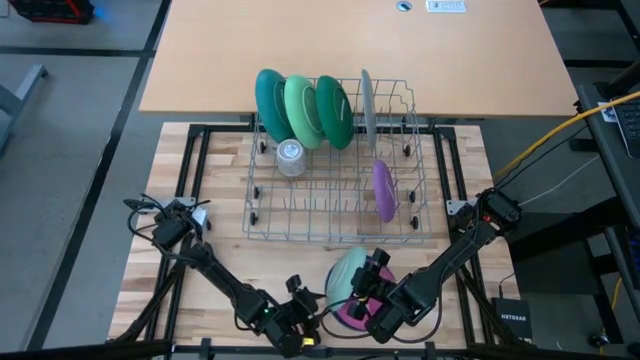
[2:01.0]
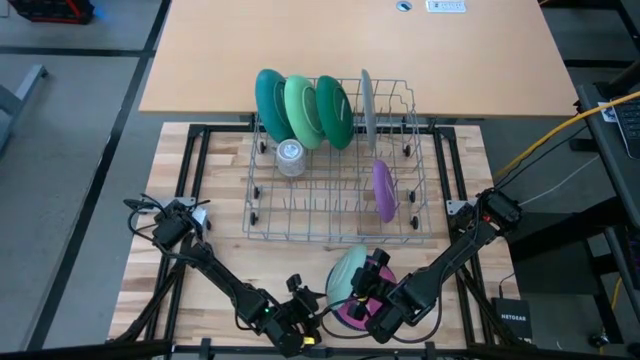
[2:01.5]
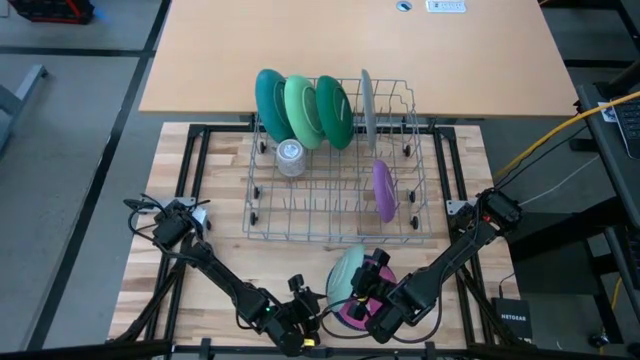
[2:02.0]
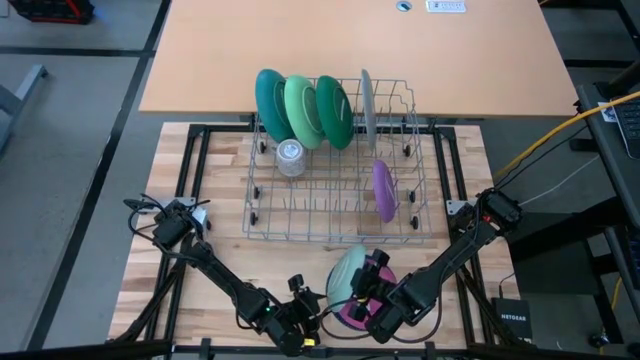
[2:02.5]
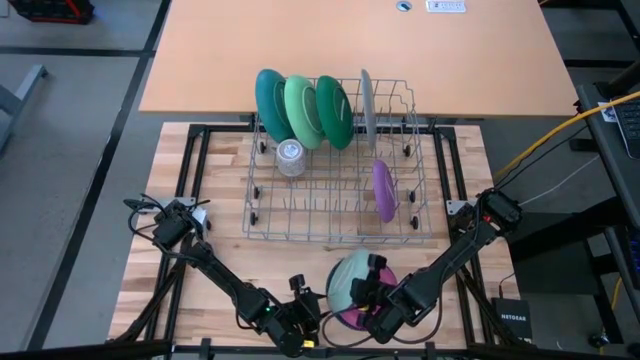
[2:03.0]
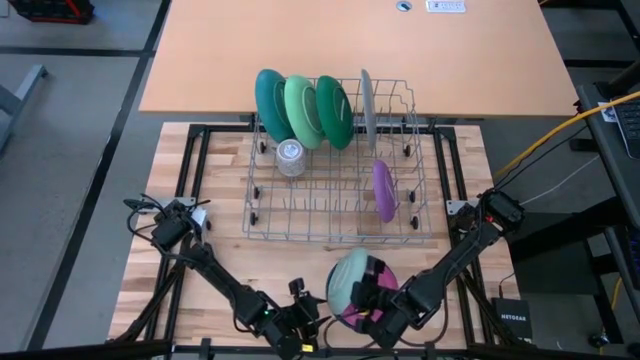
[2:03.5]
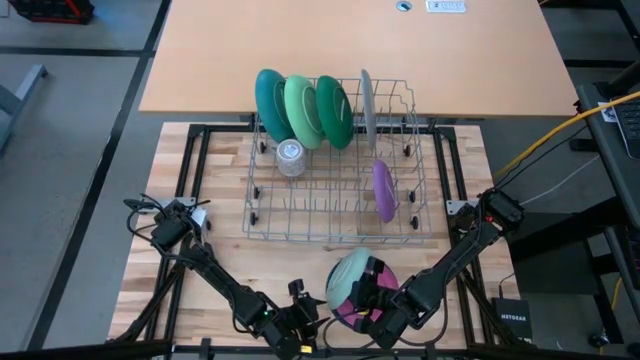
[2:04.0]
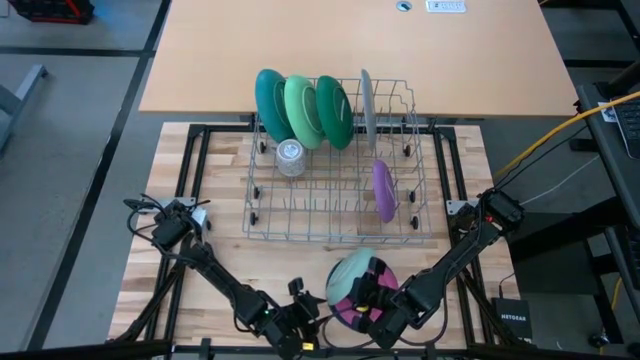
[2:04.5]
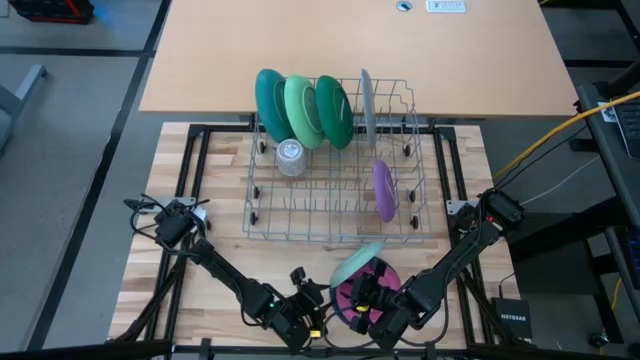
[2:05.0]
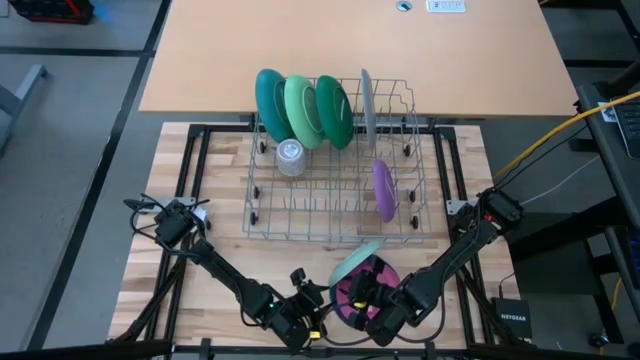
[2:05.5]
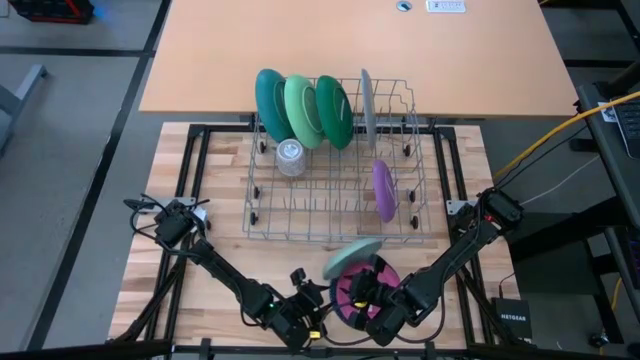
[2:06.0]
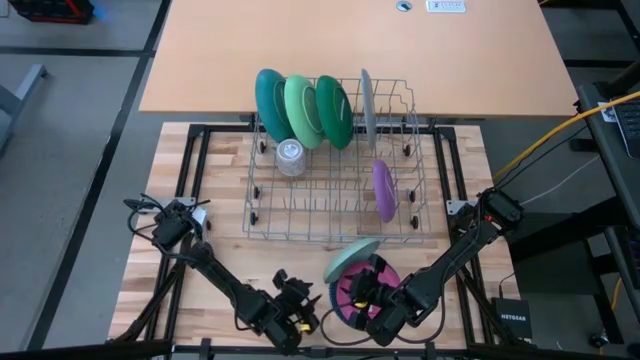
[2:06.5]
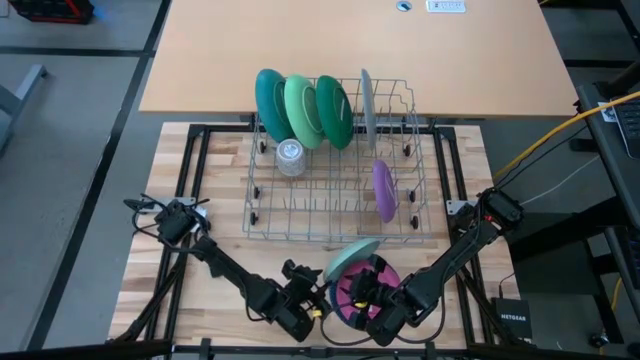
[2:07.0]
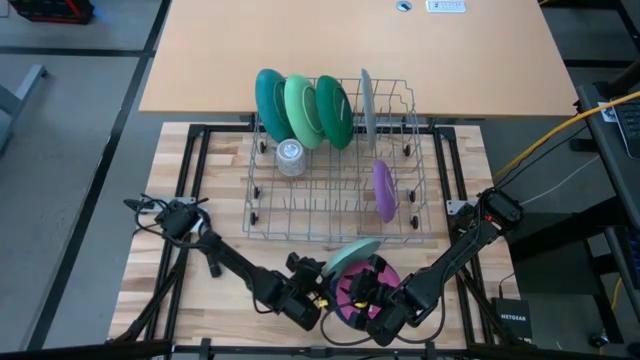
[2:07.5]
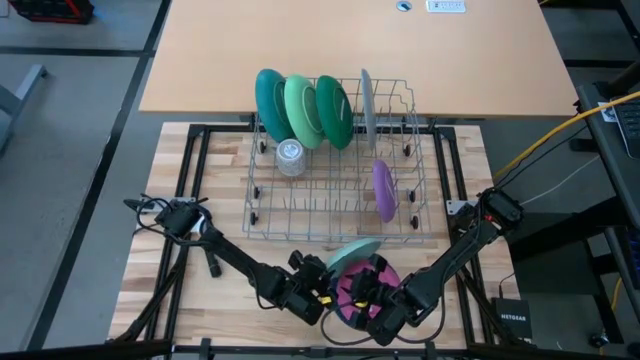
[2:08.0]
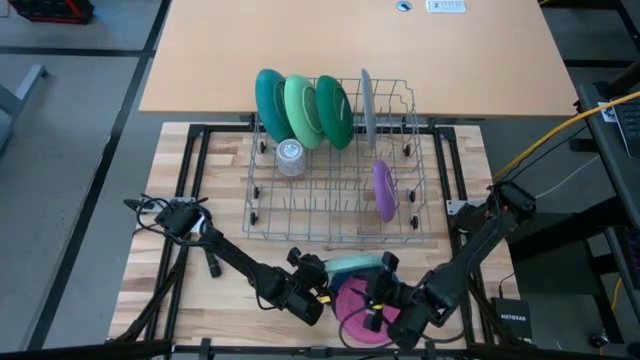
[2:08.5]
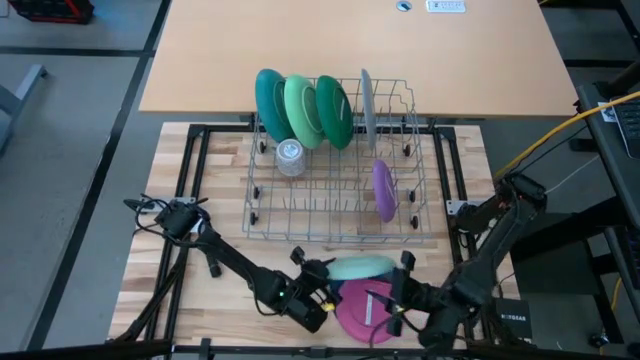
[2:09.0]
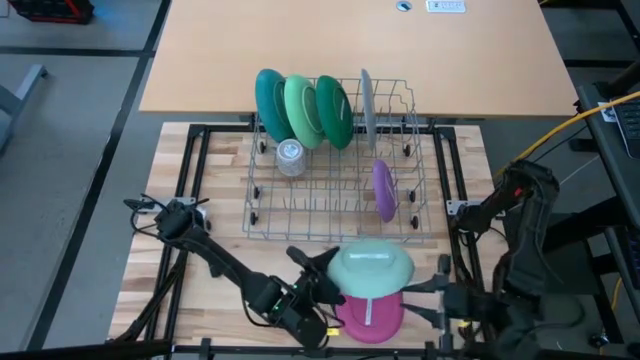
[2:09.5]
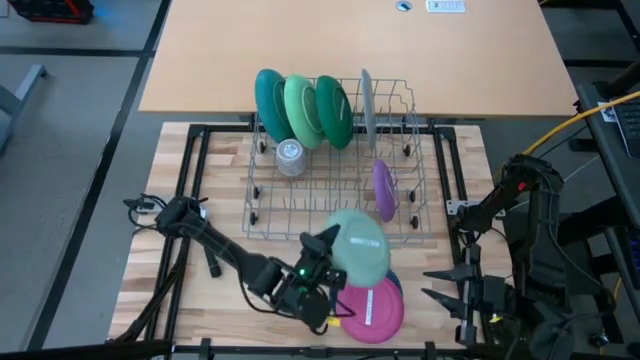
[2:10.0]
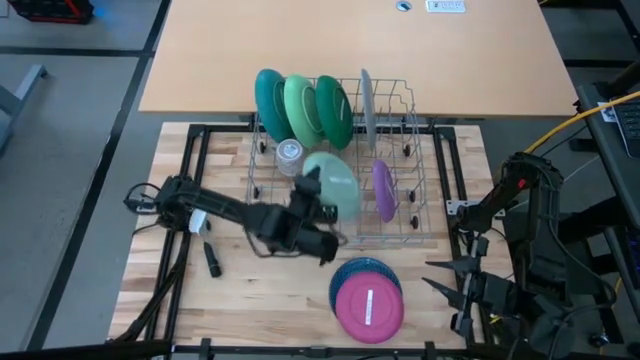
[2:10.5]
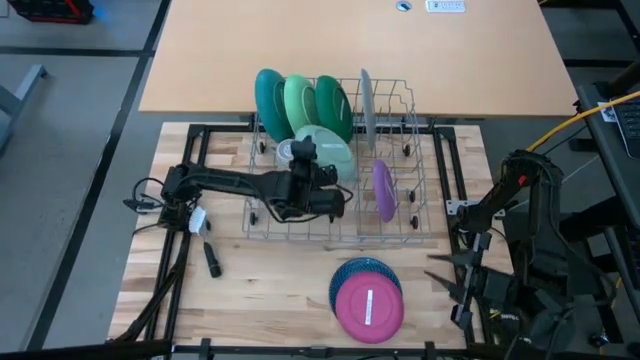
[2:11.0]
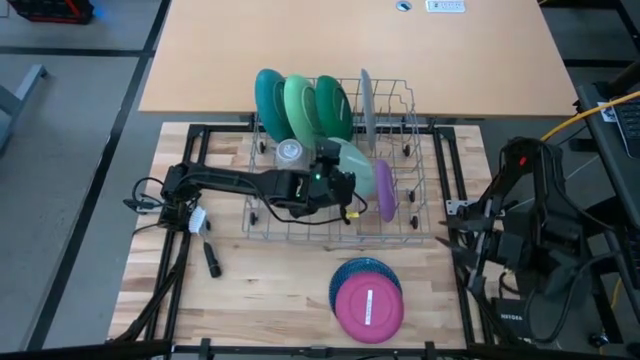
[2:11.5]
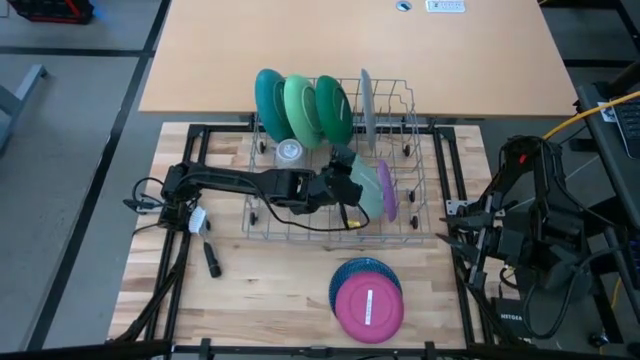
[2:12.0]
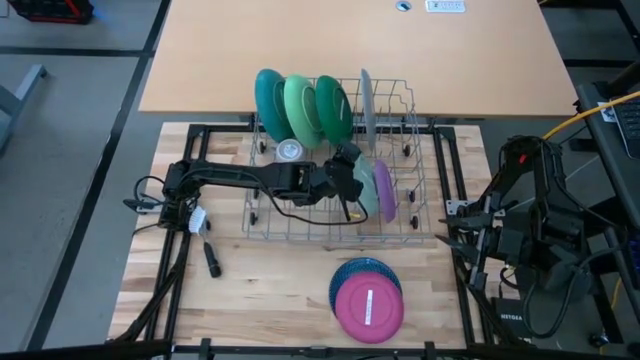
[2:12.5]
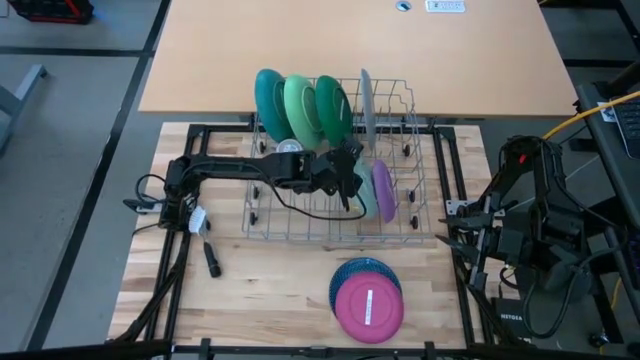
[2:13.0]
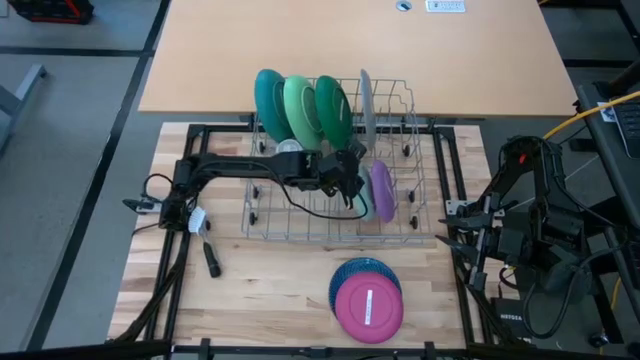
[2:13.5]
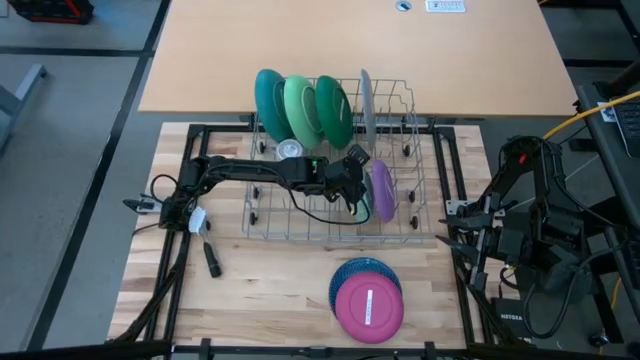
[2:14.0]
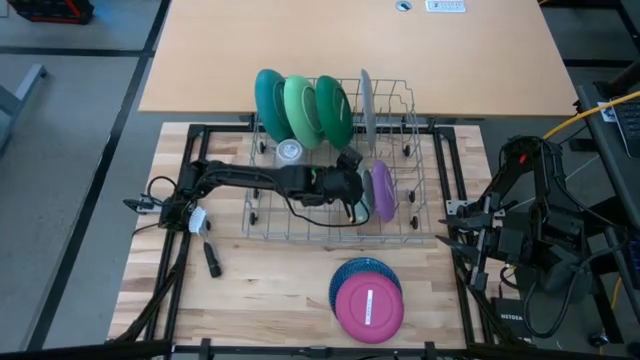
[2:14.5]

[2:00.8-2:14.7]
Task: Sort dishes
Put the light blue plate in the dish rack

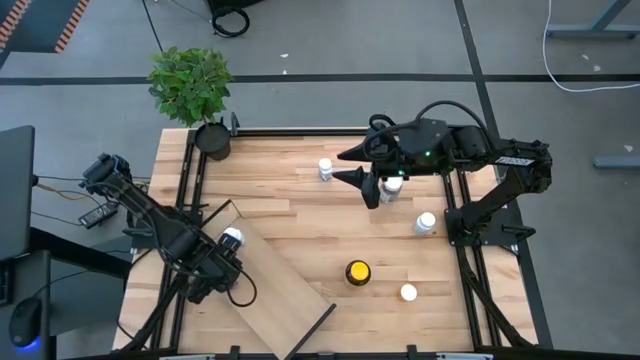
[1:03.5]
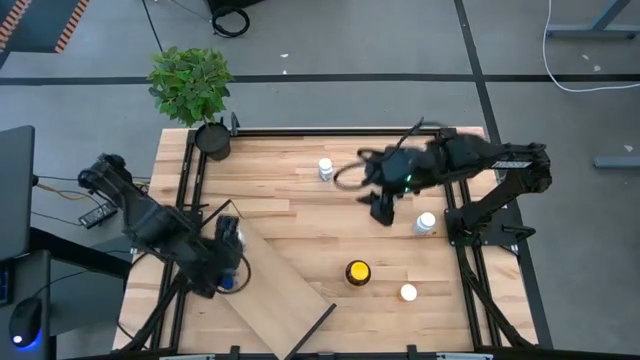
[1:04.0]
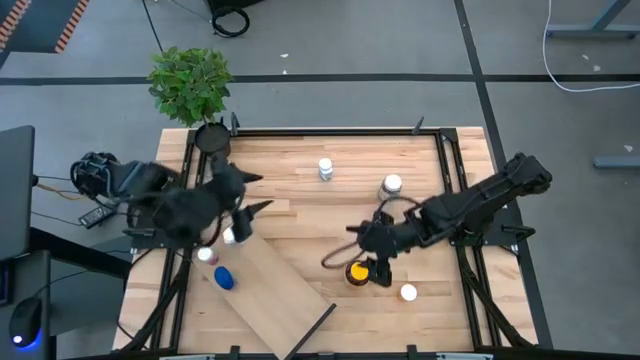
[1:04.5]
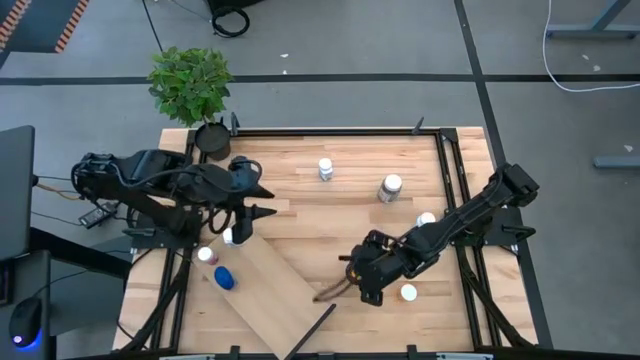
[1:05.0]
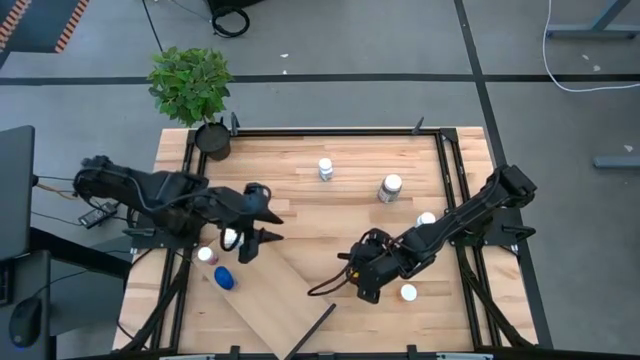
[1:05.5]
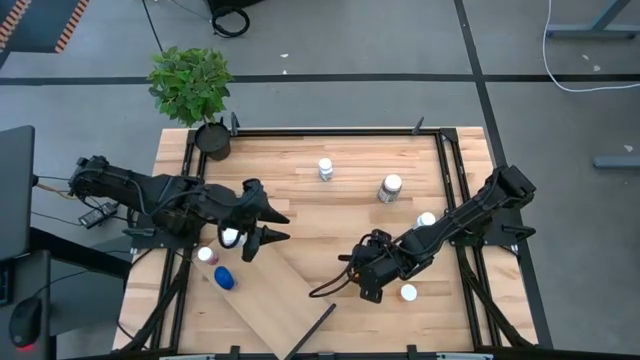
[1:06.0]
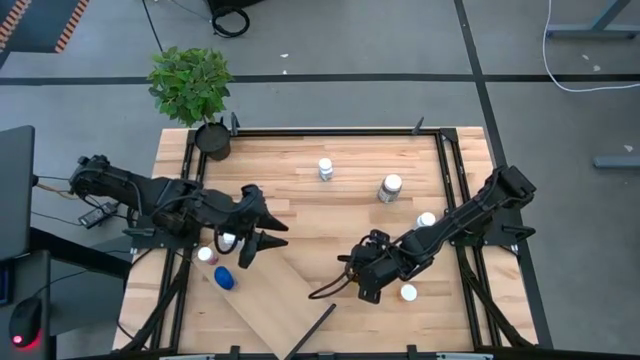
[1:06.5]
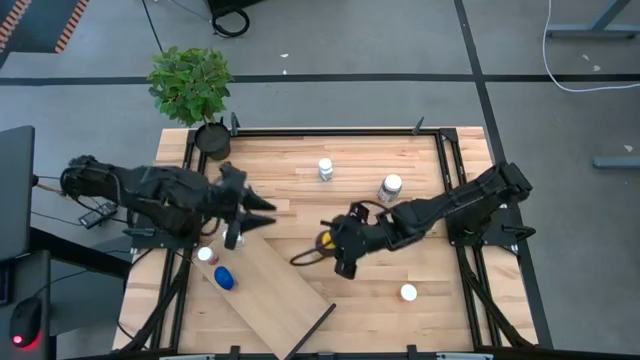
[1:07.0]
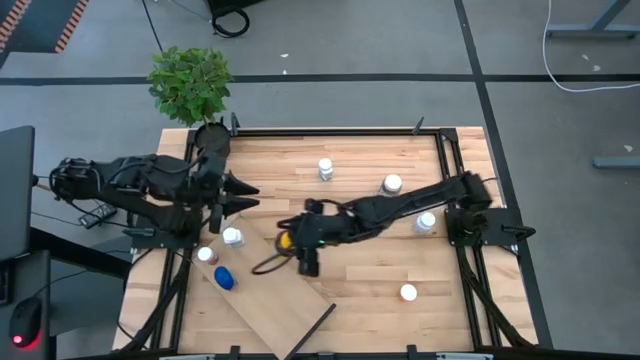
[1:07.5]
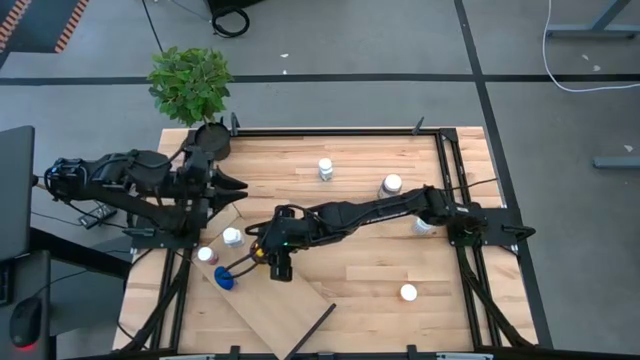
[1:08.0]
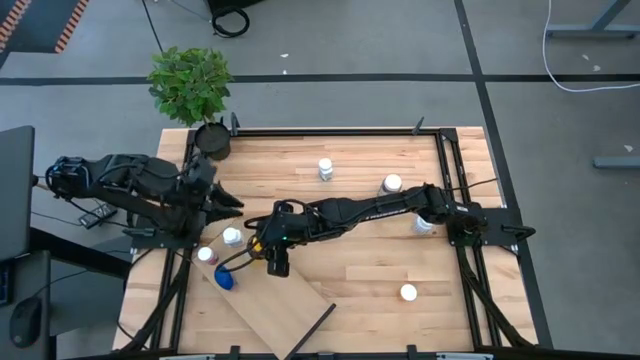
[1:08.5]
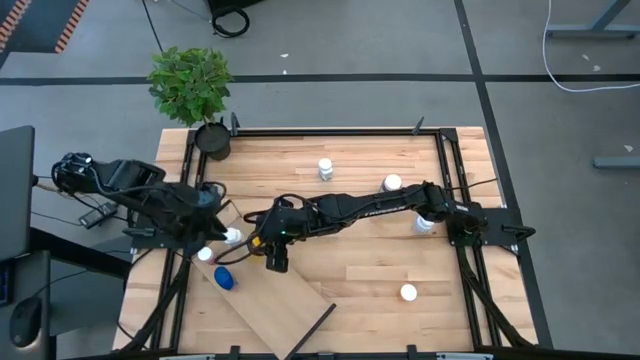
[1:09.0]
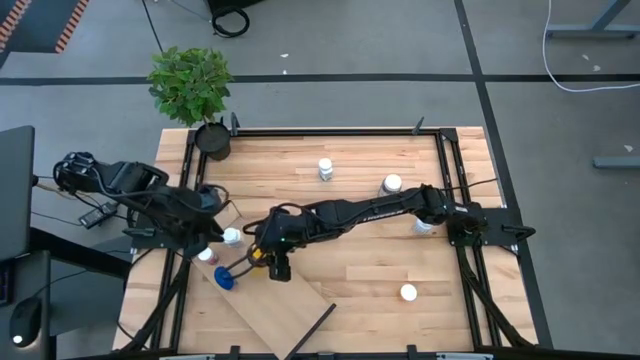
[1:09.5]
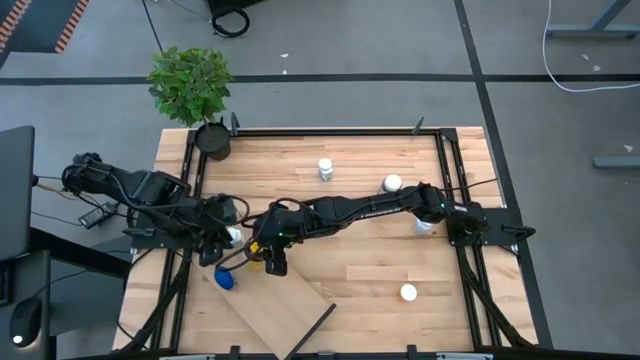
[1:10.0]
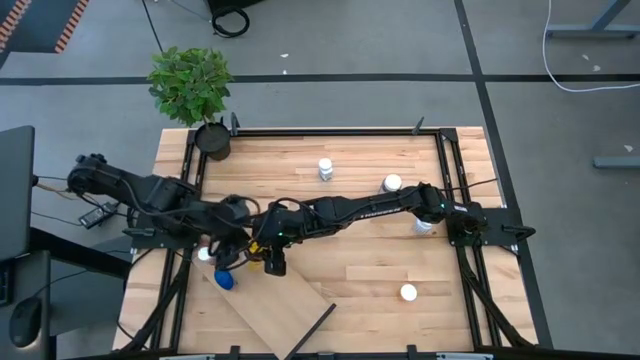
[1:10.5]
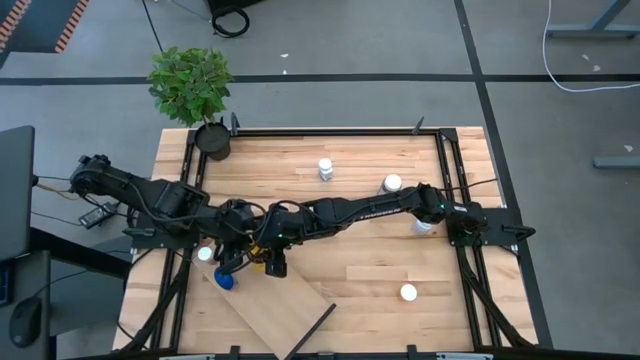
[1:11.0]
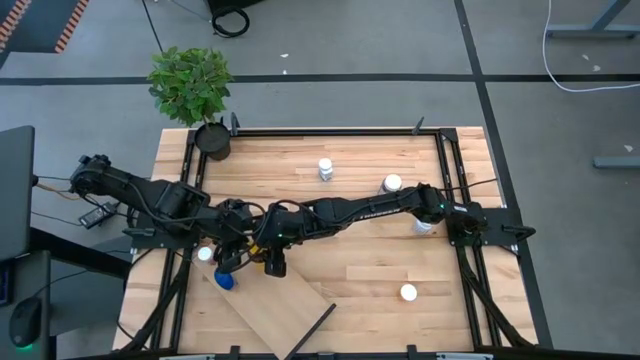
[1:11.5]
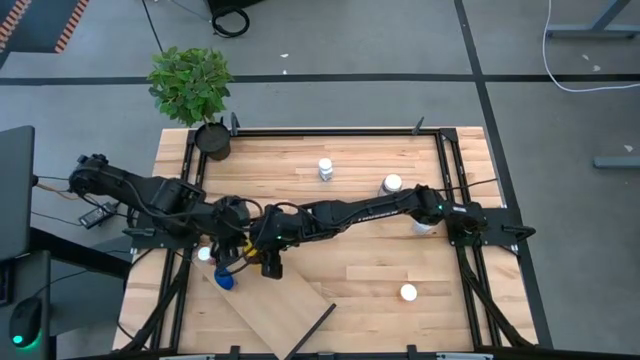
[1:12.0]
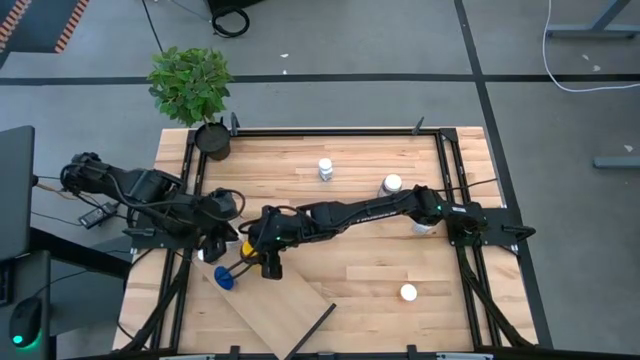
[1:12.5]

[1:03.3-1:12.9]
Task: Pick and place medicine bottles onto shelf by color
Put the yellow pill bottle on the shelf
